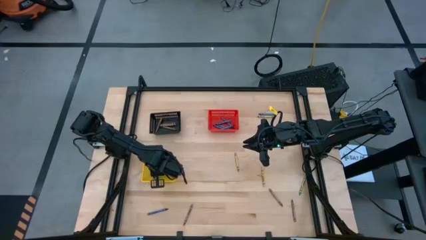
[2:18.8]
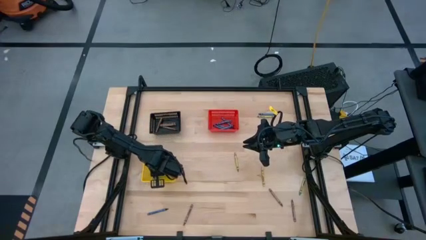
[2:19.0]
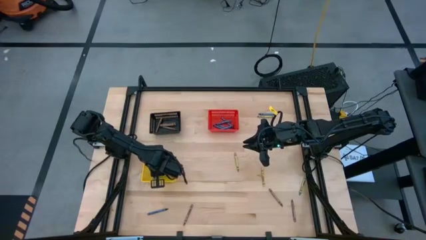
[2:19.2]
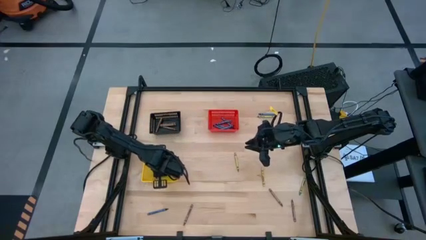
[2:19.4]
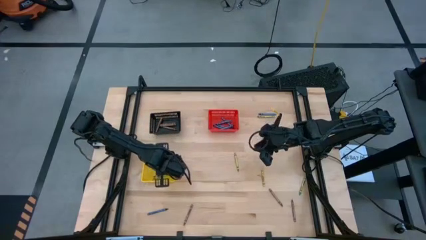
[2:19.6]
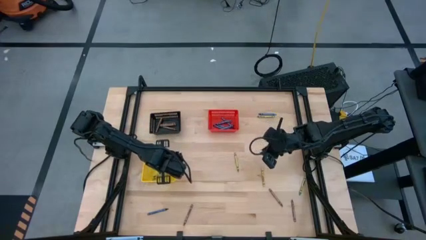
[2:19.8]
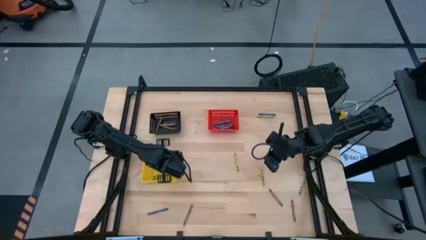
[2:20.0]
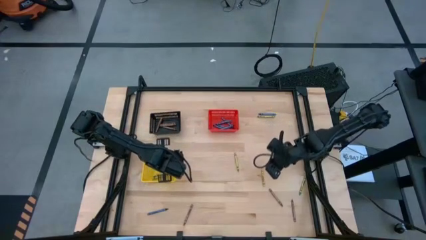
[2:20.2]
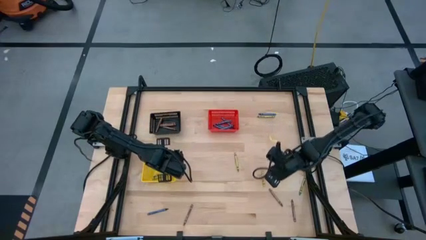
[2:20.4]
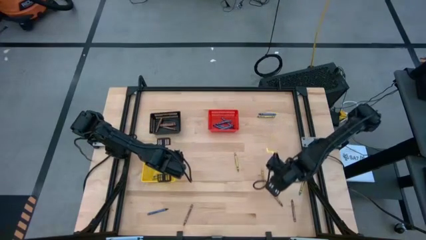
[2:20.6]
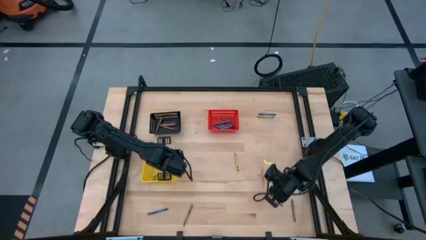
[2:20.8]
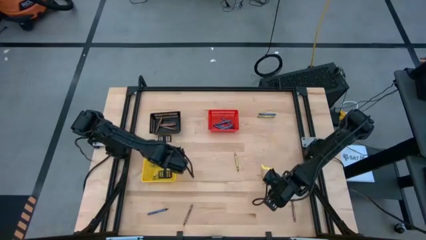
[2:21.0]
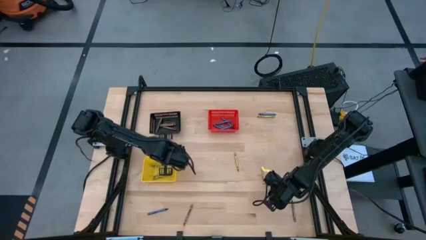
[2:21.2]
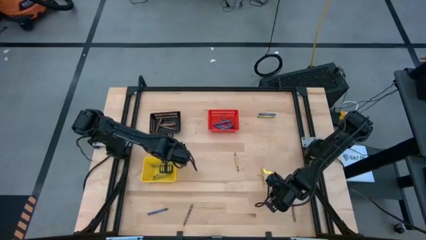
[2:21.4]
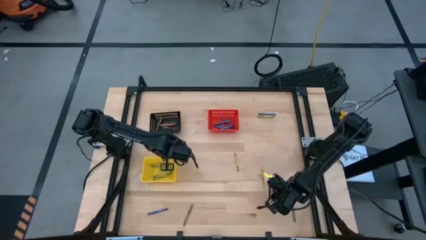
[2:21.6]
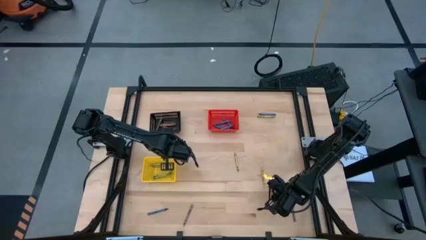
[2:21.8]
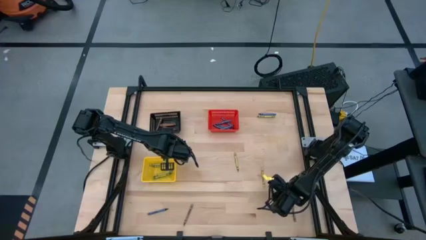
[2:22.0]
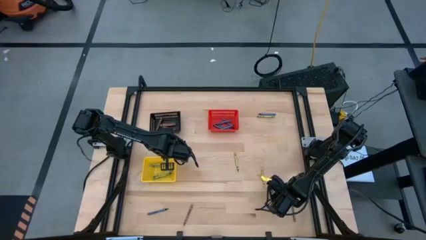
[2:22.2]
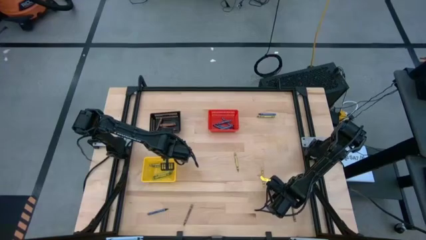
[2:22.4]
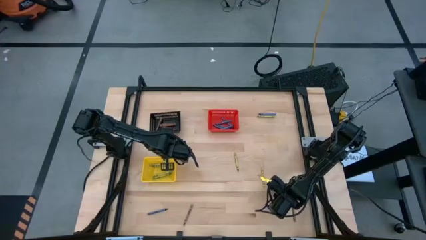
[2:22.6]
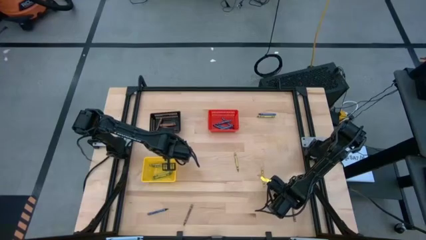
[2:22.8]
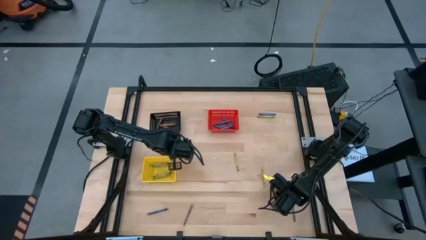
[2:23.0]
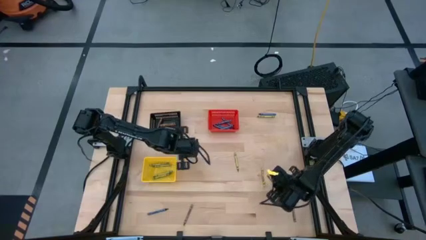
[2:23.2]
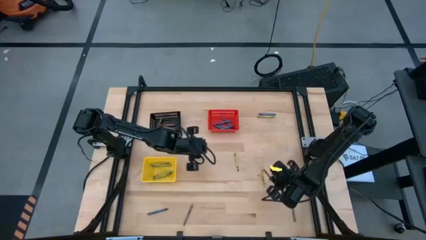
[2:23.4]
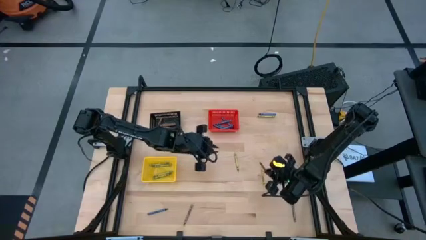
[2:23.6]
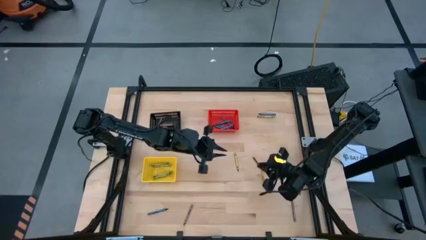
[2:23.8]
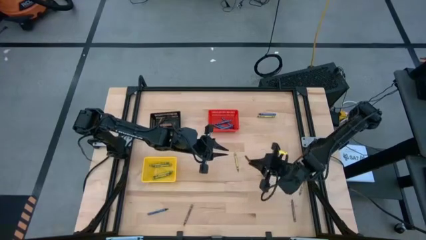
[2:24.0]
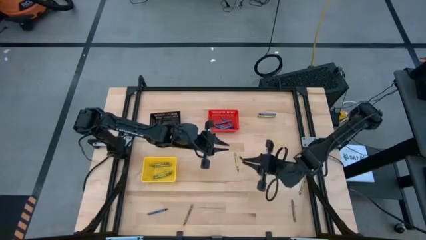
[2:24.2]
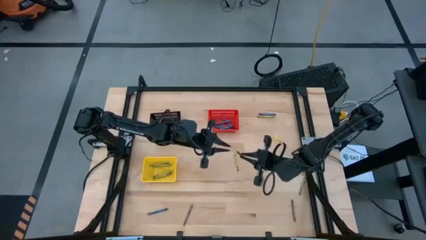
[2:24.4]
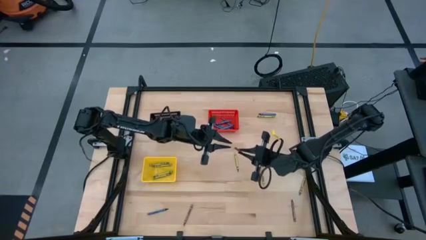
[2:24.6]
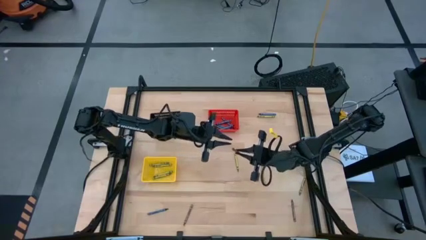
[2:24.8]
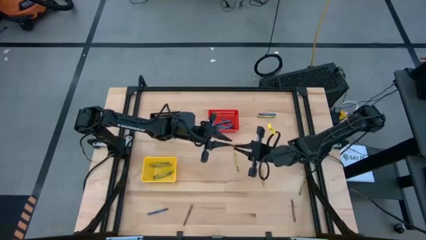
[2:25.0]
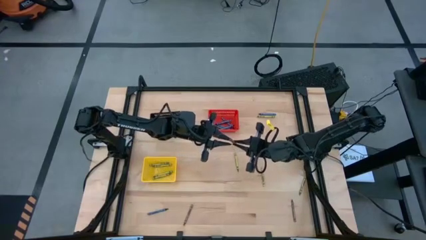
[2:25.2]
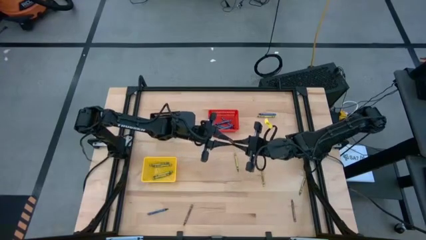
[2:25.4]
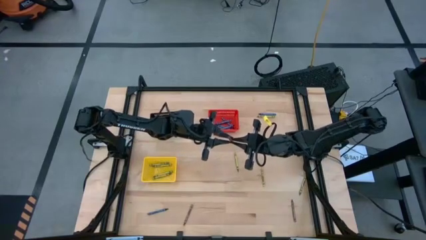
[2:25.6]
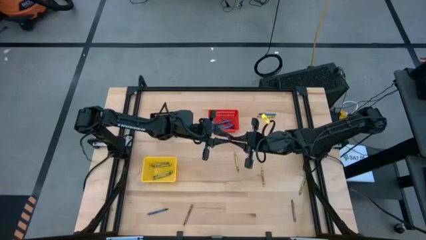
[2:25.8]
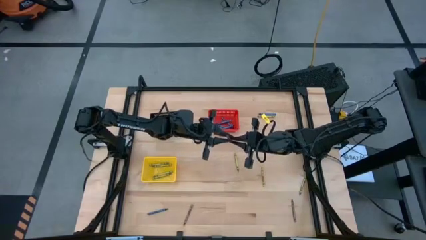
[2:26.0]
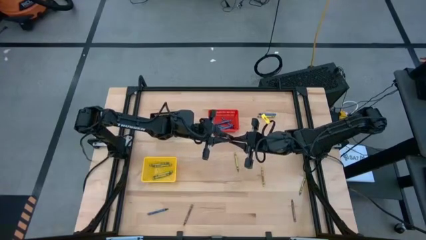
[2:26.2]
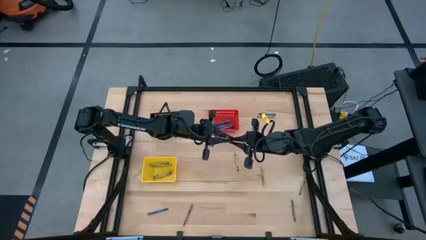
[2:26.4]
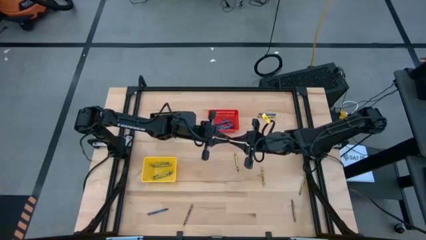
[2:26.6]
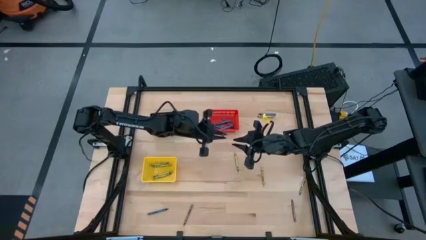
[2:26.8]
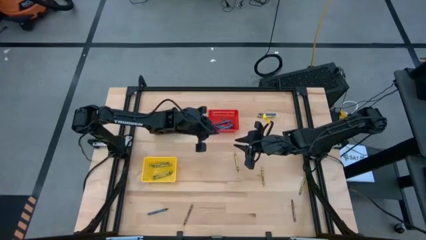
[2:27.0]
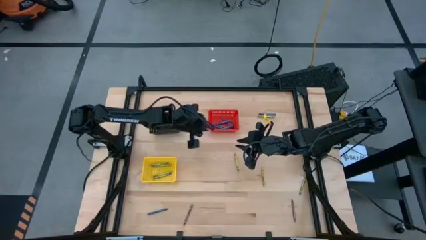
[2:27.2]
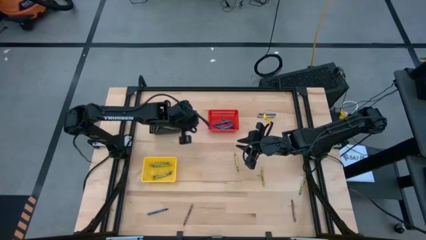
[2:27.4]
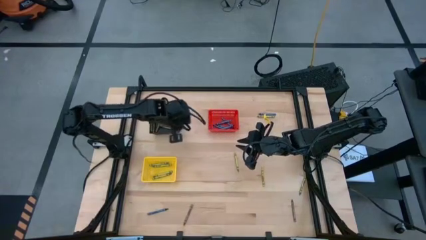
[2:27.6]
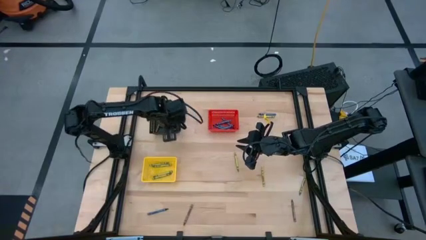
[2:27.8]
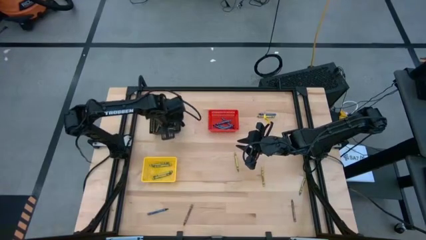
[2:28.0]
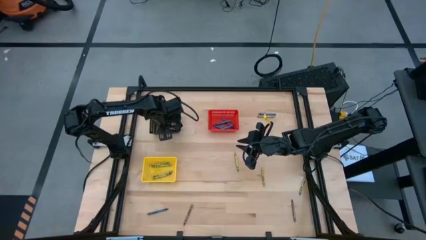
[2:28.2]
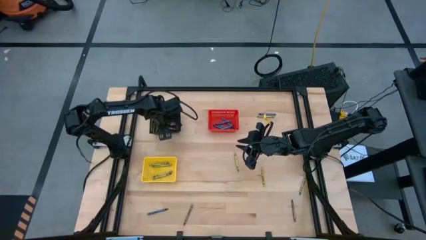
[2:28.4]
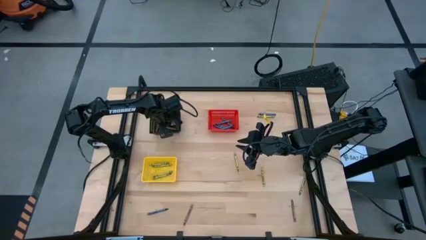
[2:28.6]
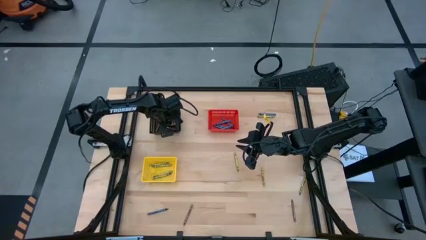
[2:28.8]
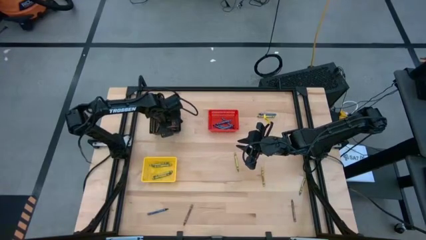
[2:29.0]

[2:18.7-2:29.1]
Task: Sort crayons
Put the brown crayon into the black bin

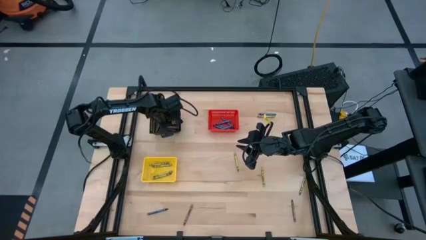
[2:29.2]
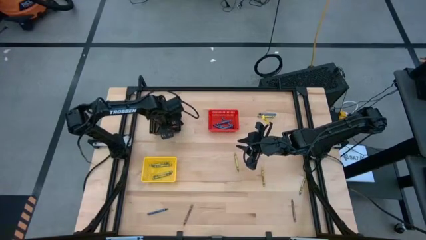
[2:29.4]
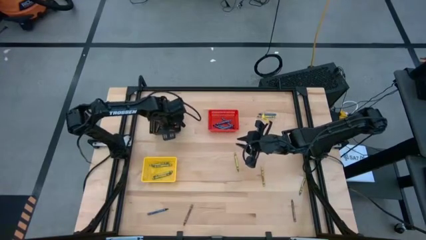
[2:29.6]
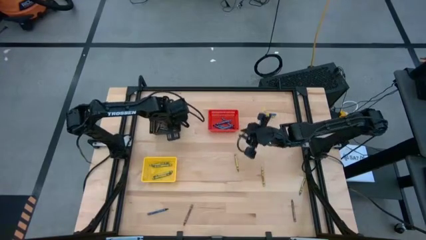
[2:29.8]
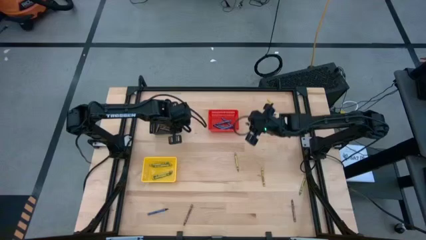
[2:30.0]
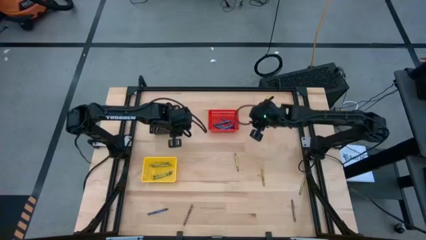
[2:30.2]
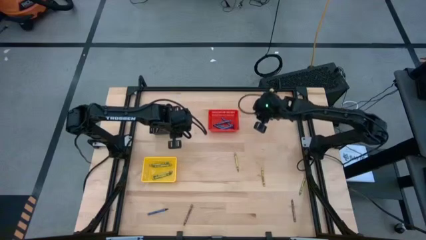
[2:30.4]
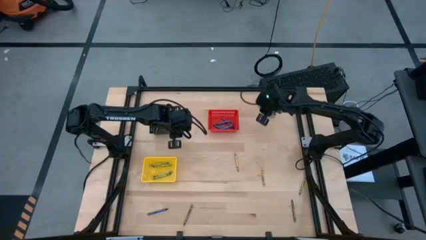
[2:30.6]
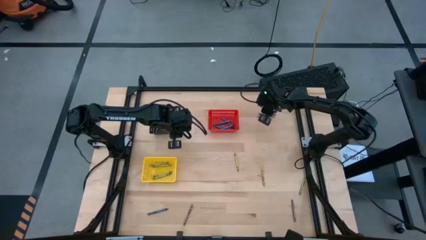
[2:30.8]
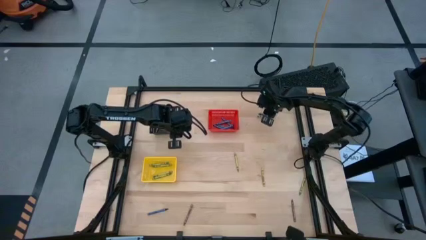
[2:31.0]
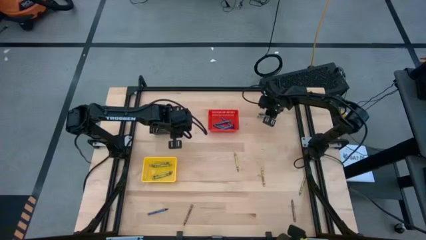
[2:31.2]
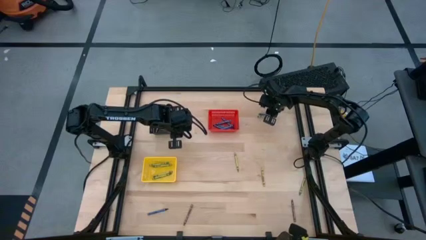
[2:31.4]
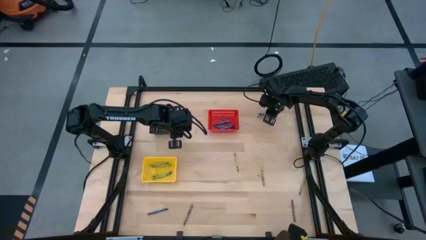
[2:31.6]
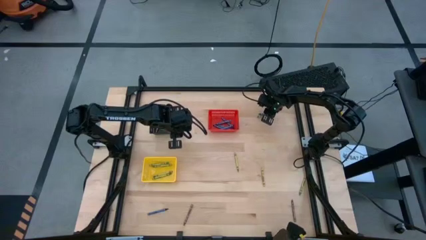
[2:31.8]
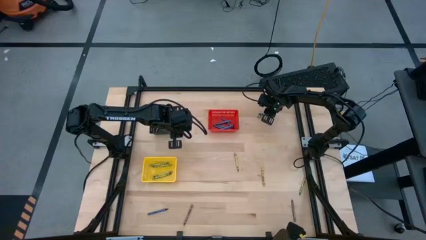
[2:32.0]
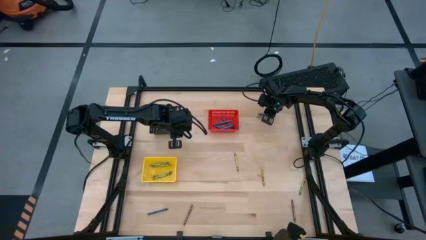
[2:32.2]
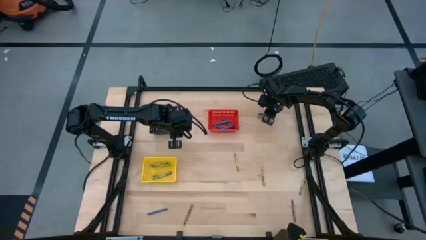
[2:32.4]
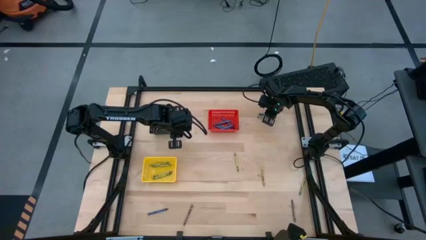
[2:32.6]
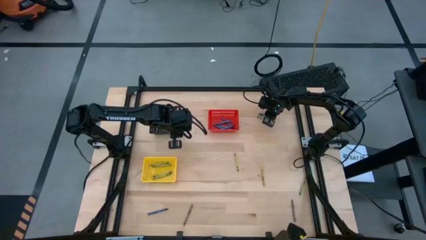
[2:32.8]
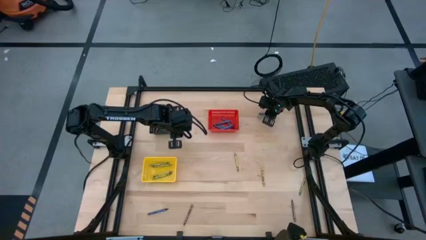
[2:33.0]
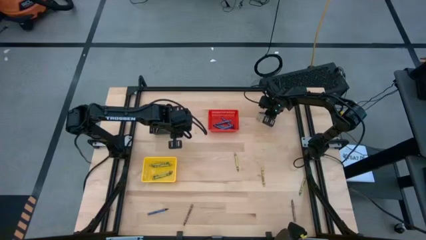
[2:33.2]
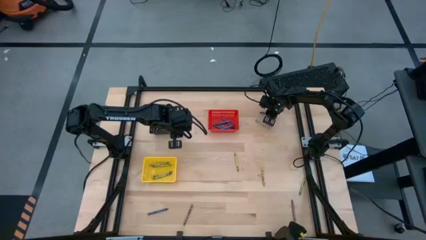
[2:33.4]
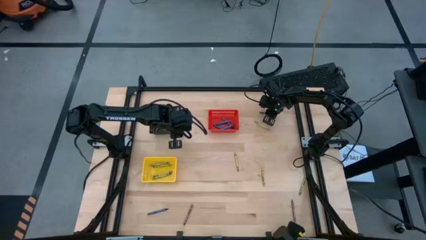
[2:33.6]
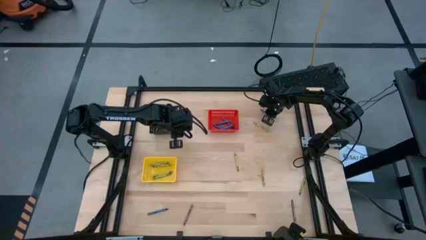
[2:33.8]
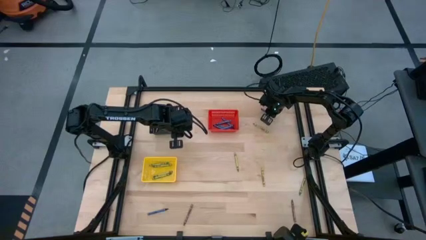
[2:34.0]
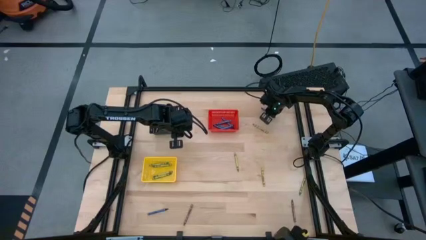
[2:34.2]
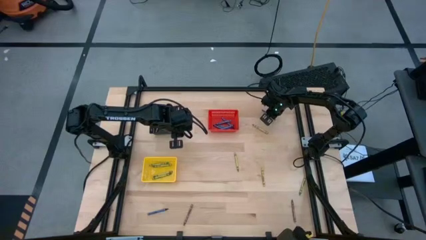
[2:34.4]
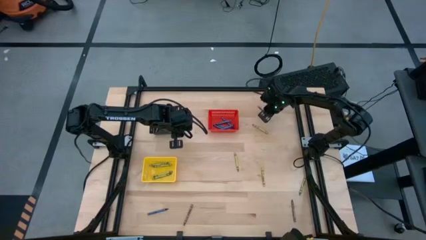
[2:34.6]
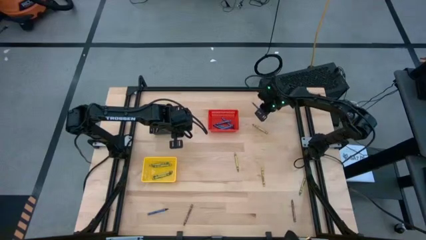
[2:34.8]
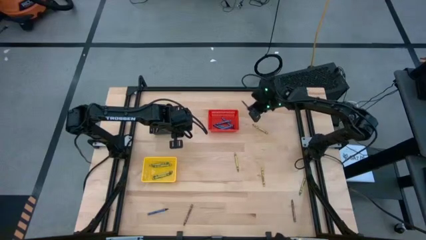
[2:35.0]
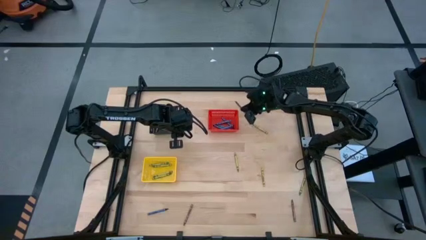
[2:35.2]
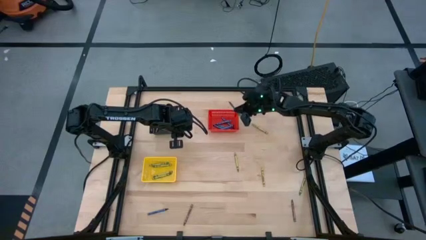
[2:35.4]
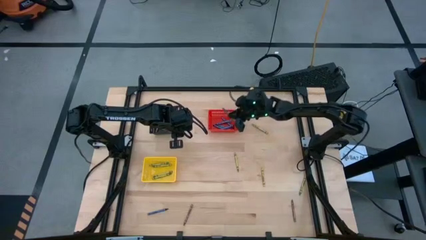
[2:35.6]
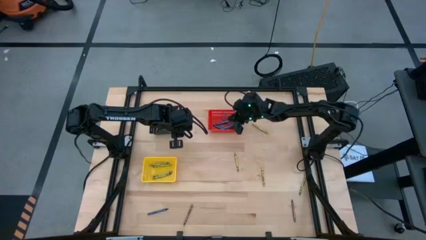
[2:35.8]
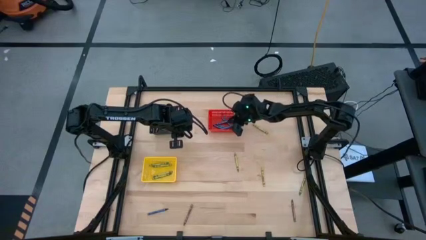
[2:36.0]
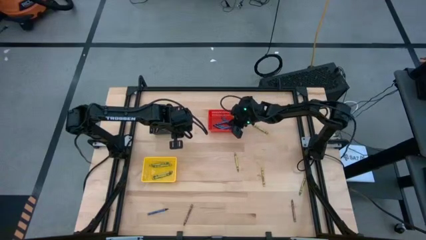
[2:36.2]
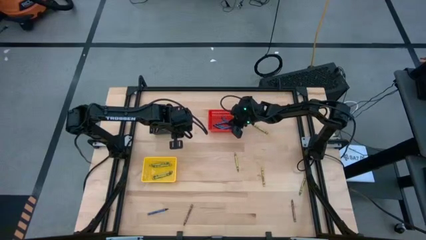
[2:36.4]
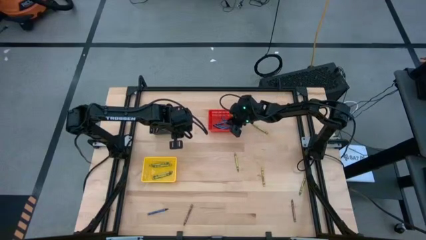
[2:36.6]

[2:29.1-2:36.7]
Put the blue crayon into the red bin
